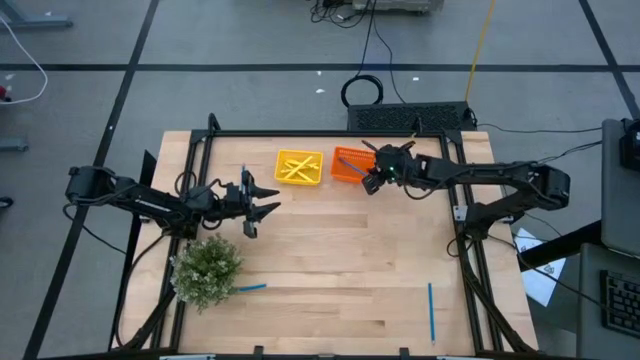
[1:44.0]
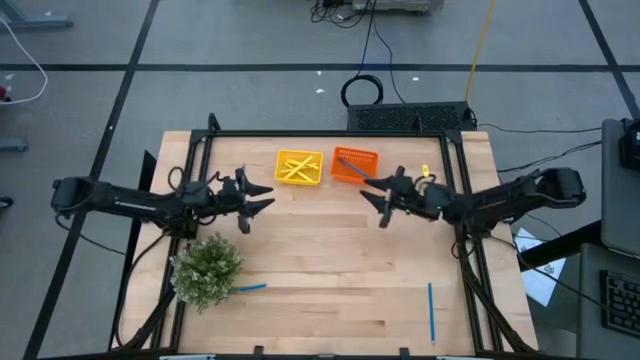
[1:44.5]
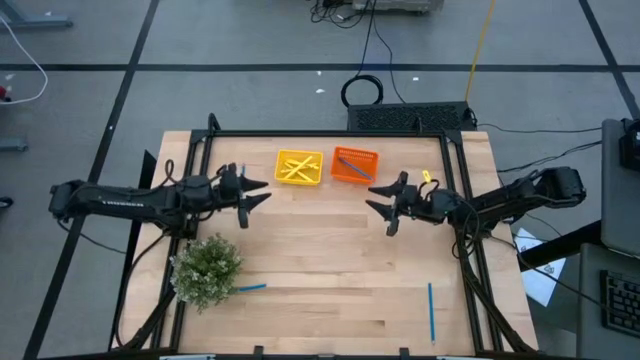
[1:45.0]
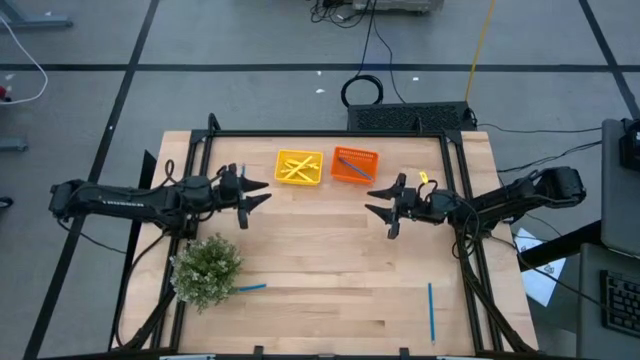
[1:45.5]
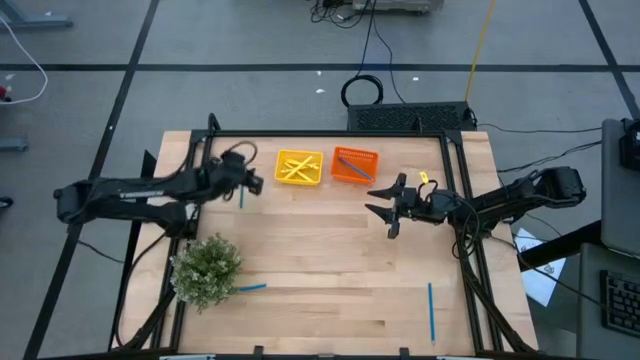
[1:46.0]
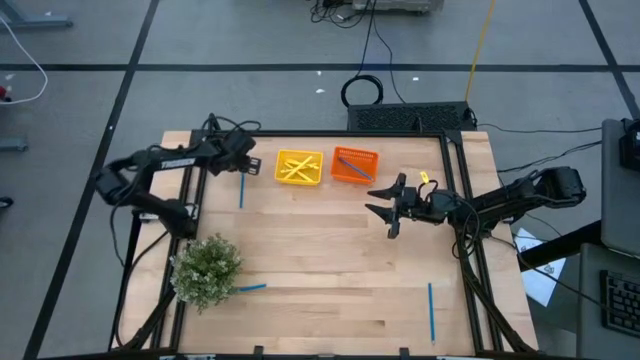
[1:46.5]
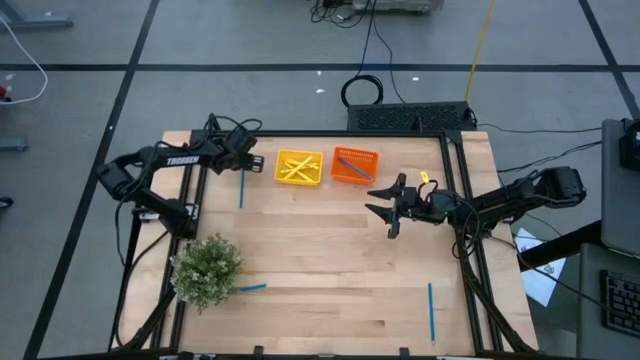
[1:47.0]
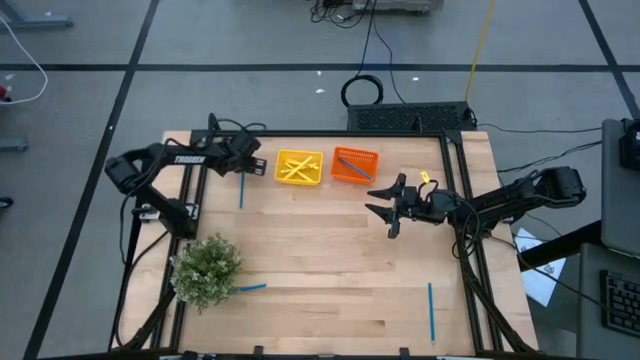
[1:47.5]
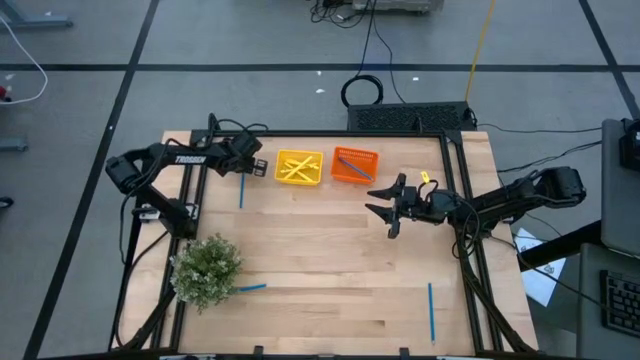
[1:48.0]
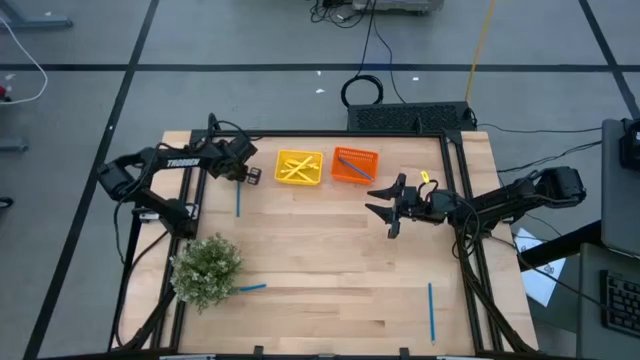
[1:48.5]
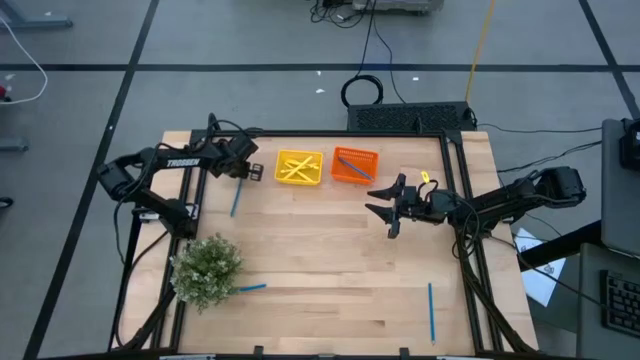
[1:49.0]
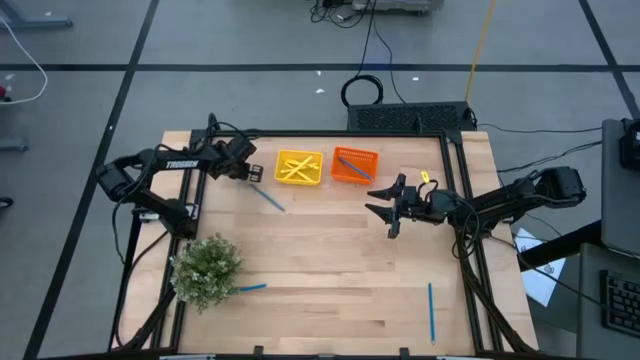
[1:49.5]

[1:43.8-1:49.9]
Task: Sort pens & pencils
Put the top left blue pencil into the orange bin

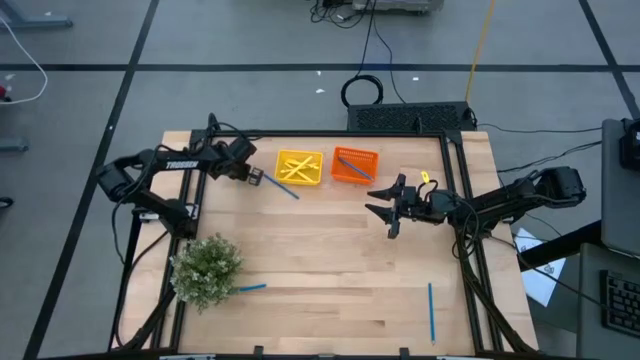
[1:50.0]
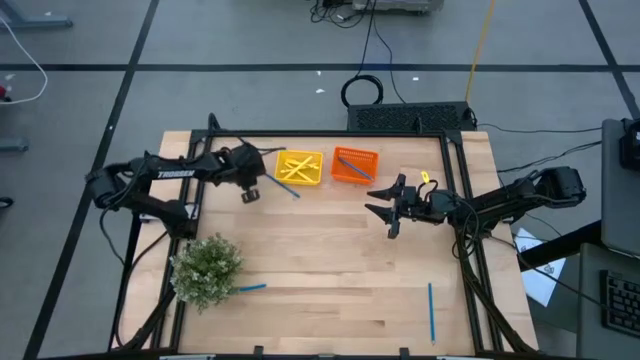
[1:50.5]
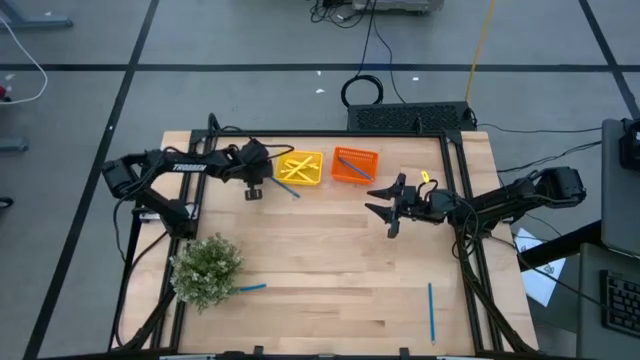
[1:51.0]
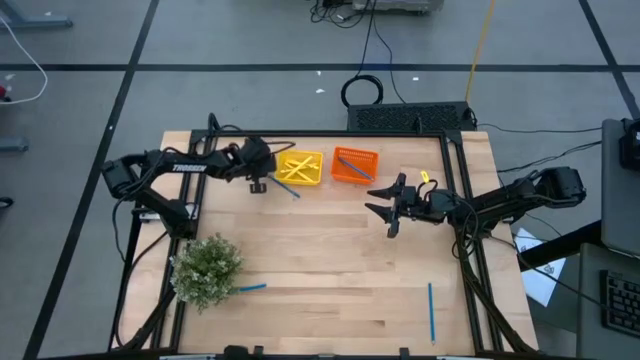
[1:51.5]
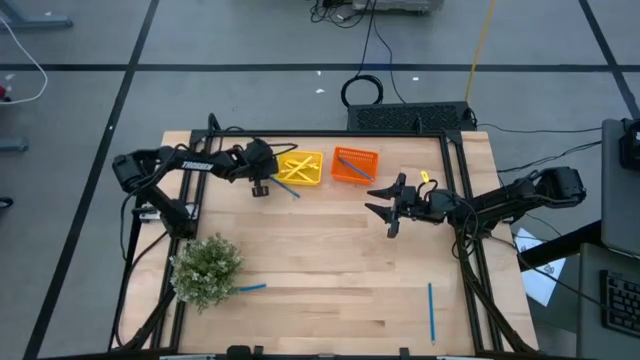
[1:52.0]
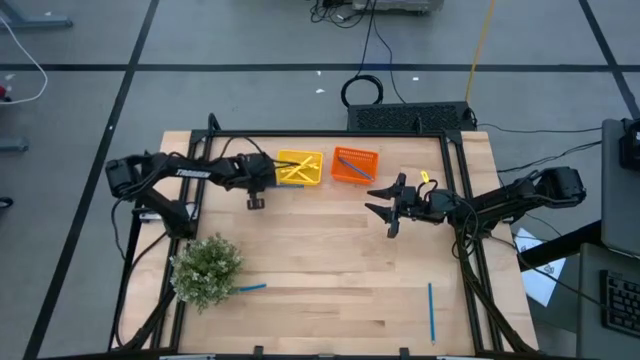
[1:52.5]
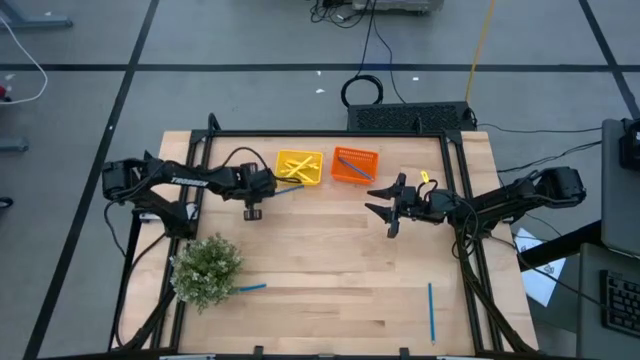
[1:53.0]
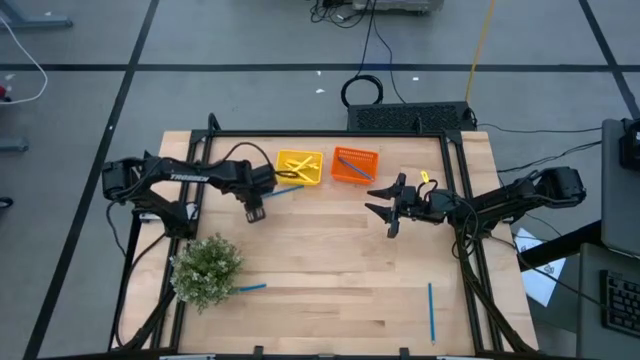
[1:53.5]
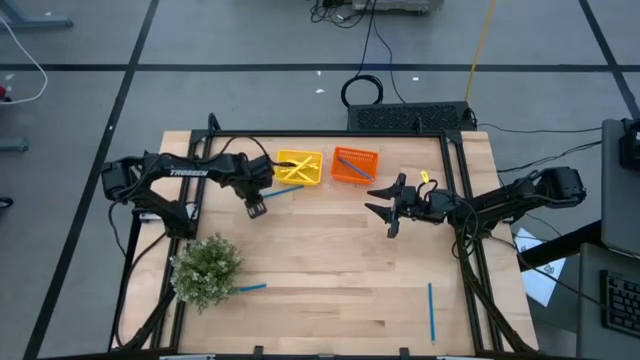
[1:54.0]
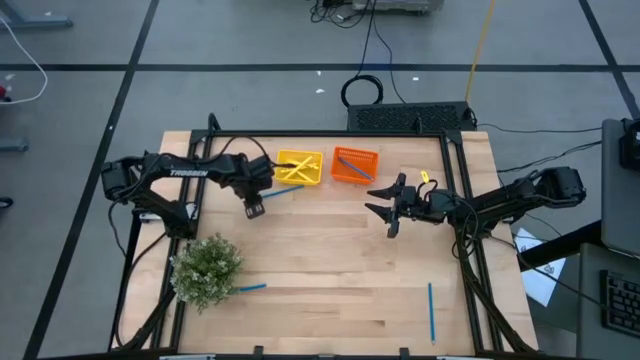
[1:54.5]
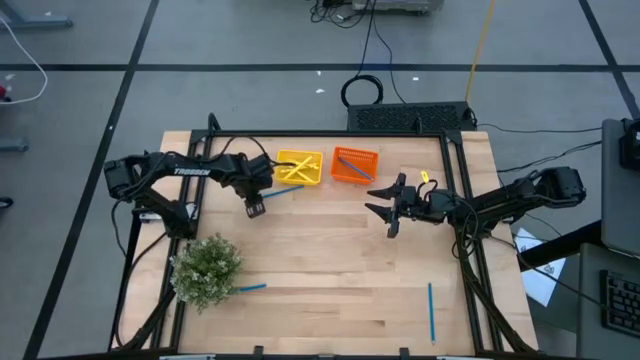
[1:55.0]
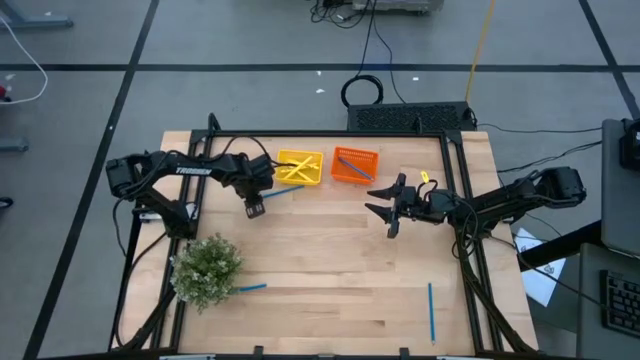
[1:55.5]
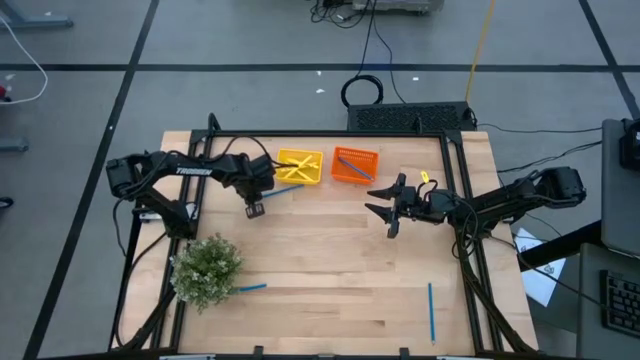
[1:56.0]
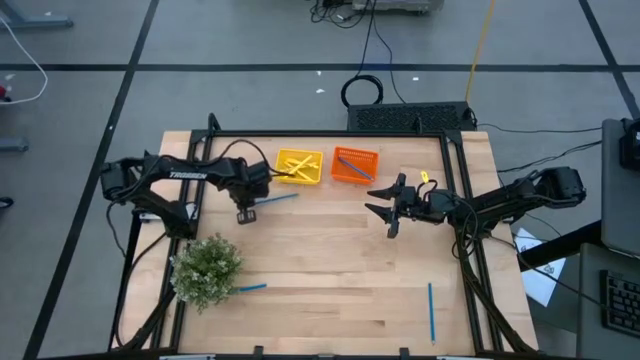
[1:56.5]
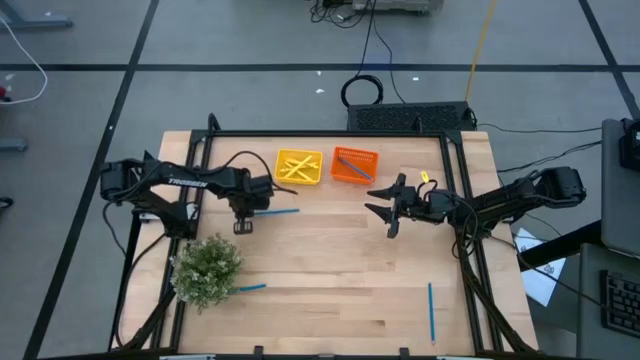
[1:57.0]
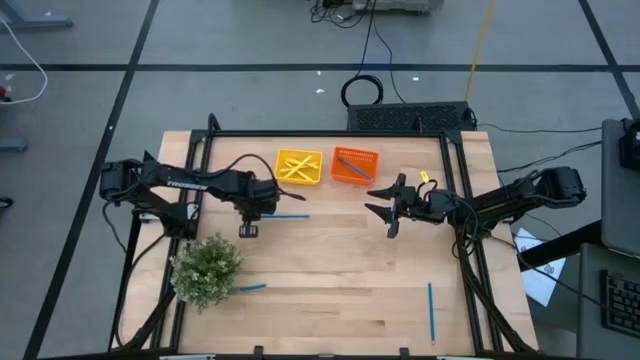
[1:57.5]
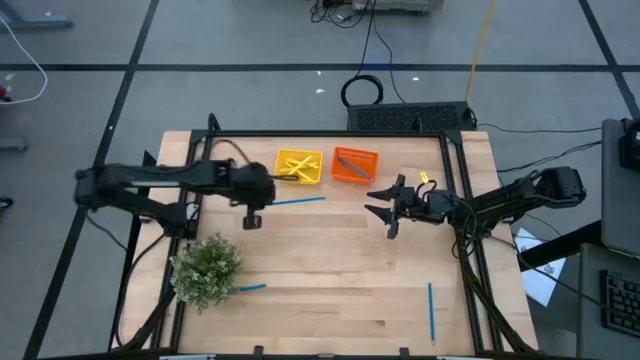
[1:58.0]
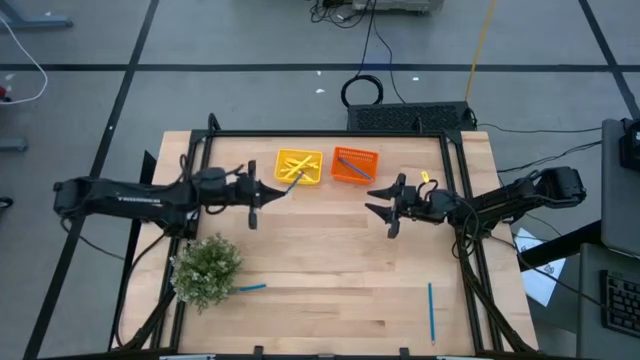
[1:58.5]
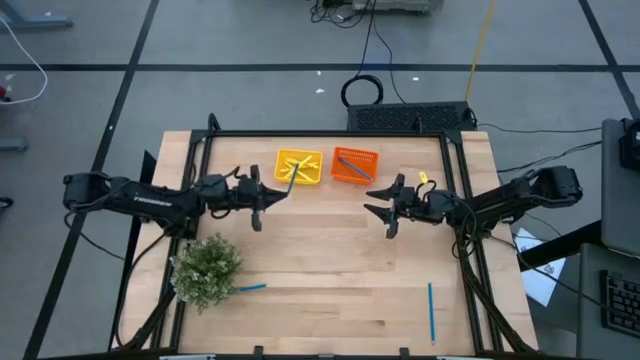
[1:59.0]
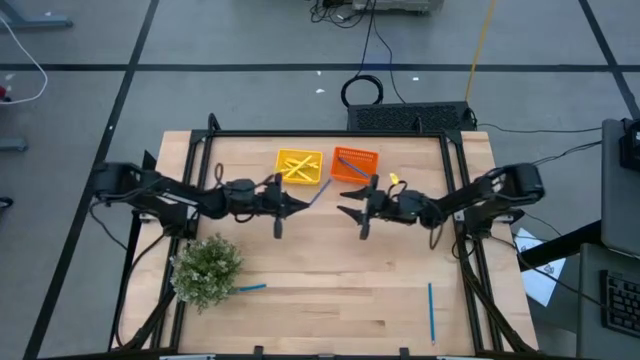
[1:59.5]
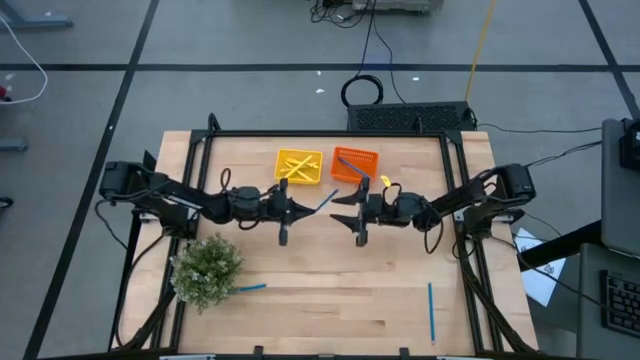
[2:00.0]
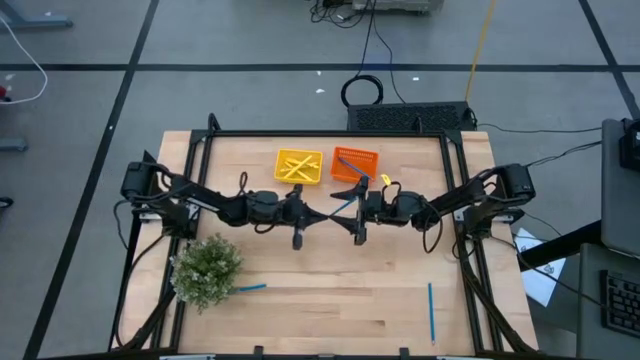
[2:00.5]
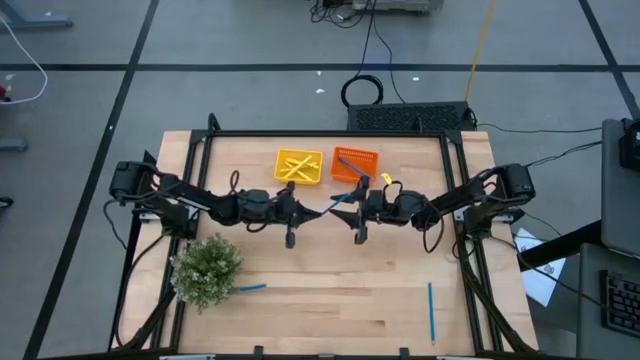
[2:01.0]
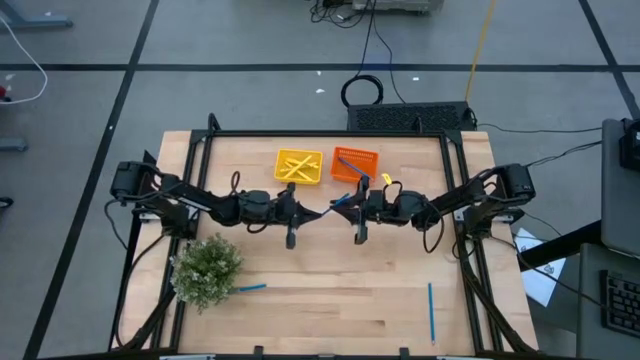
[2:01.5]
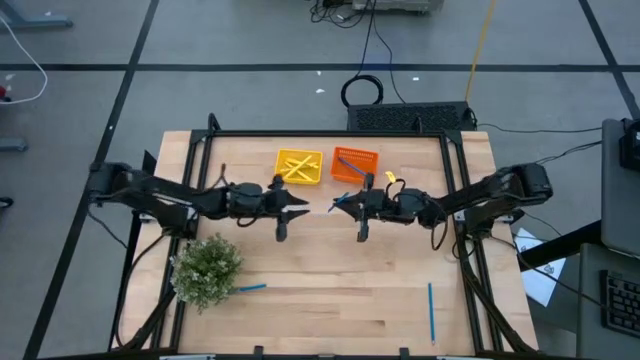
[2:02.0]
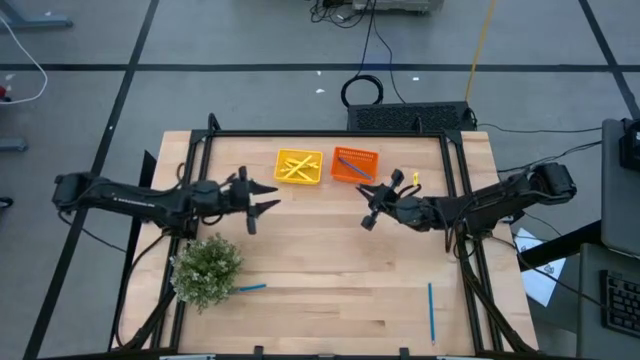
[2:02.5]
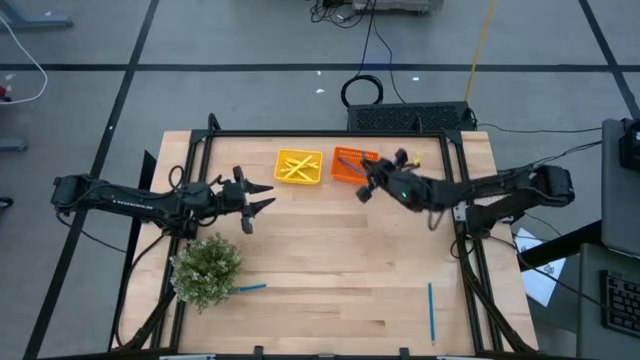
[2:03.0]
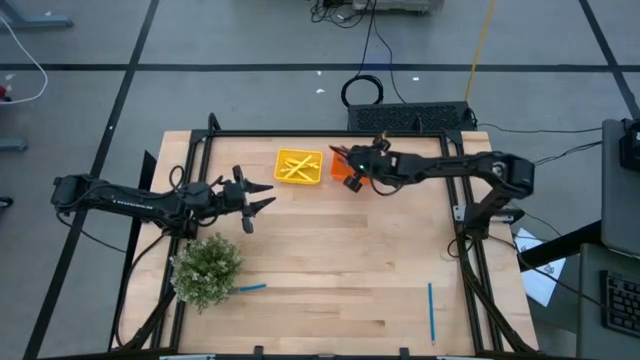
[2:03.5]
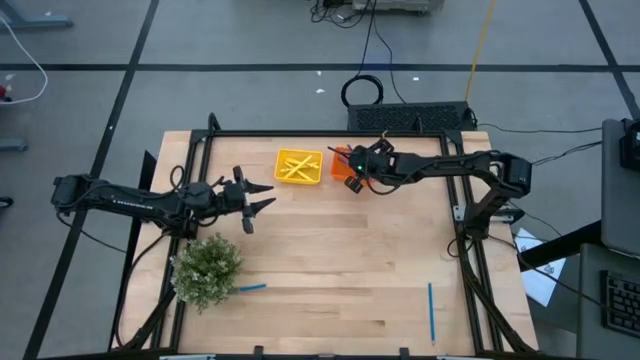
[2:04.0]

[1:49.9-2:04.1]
Put the top left blue pencil into the orange bin

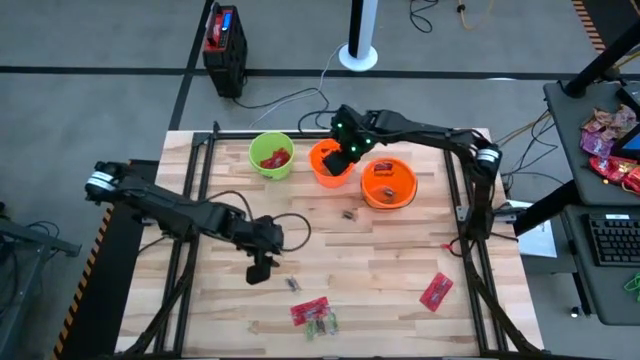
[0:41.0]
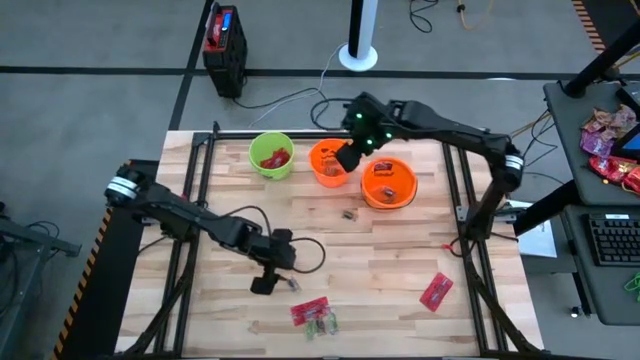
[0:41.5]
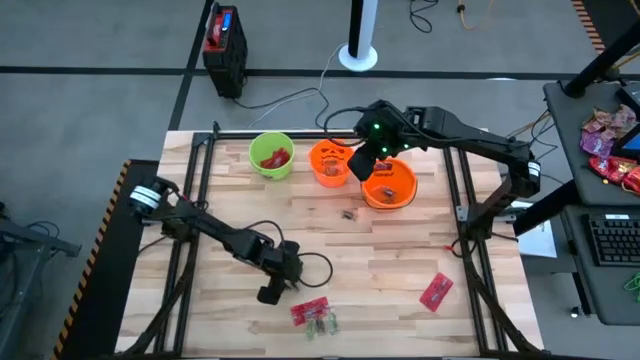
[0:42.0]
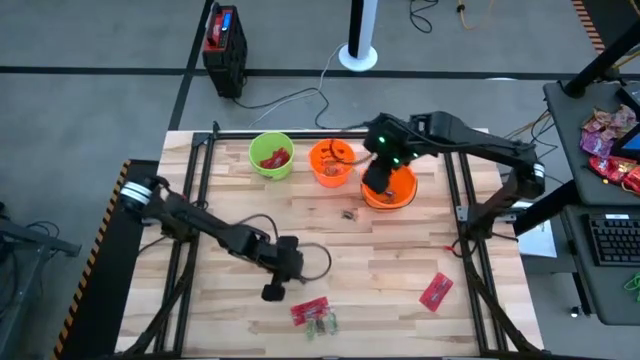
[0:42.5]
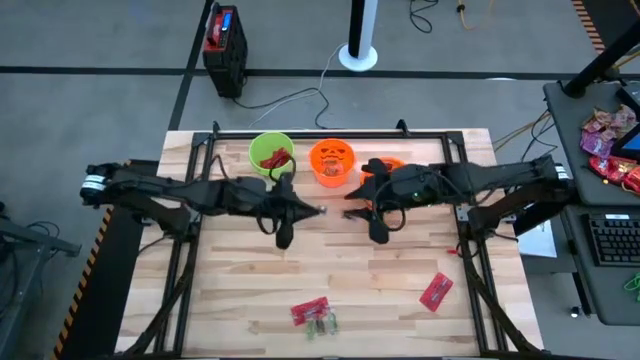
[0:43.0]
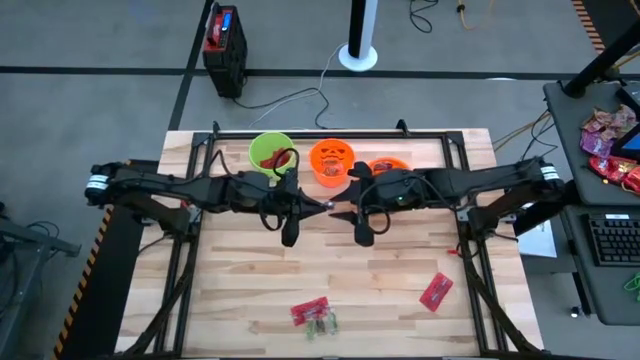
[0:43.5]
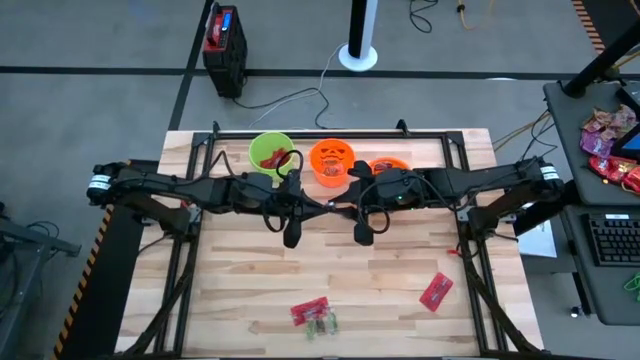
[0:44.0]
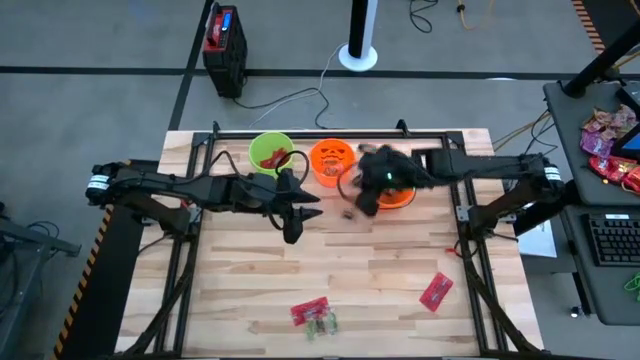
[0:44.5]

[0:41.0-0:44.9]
Task: Sort candy by brand, put in halloween buckets
Put the black candy into the right orange bucket
